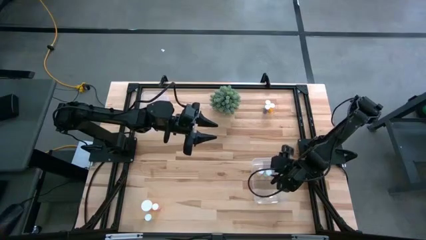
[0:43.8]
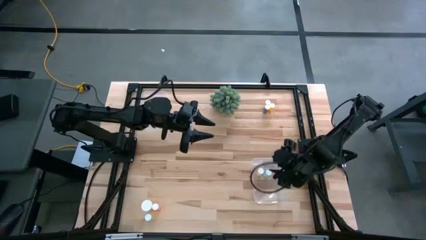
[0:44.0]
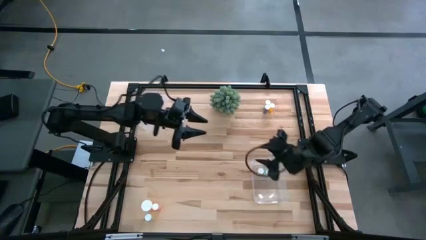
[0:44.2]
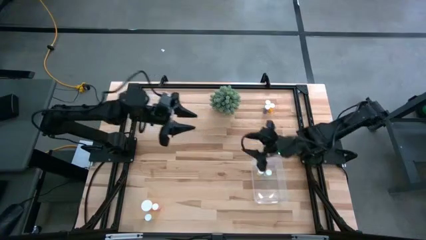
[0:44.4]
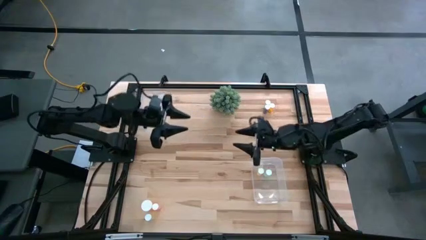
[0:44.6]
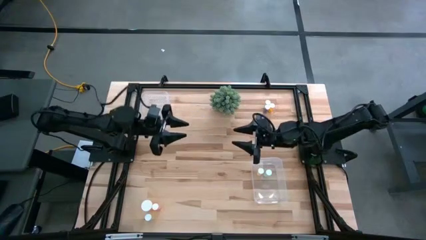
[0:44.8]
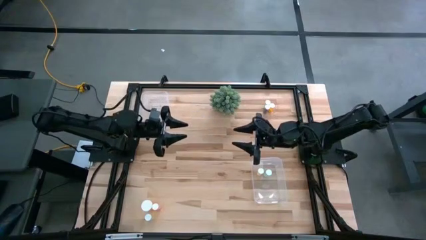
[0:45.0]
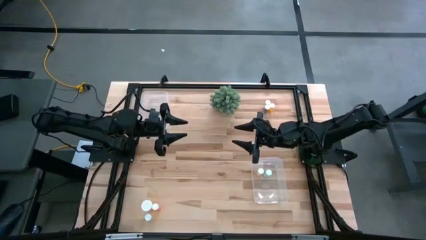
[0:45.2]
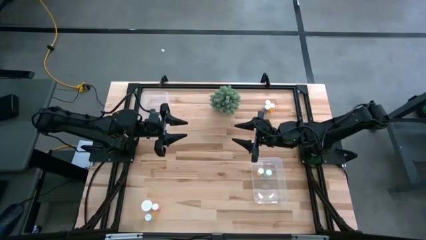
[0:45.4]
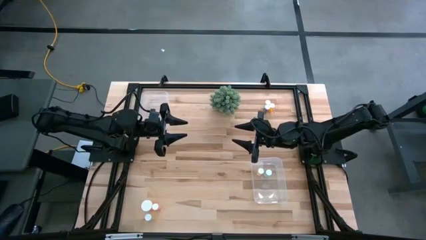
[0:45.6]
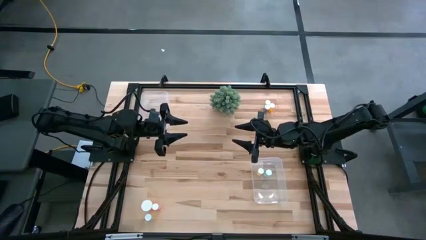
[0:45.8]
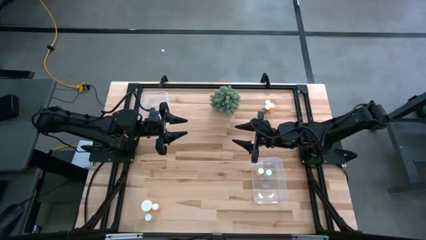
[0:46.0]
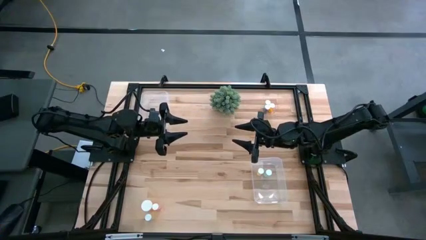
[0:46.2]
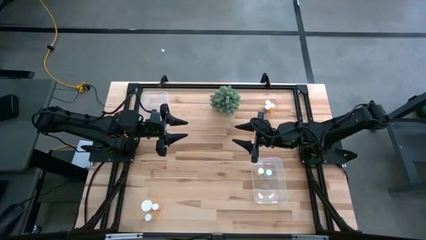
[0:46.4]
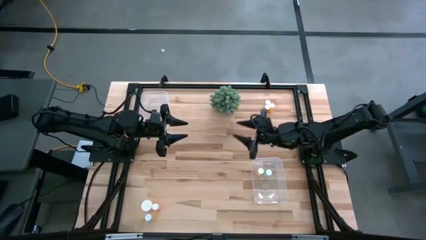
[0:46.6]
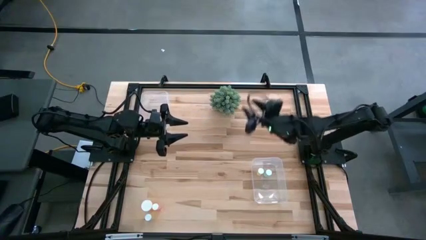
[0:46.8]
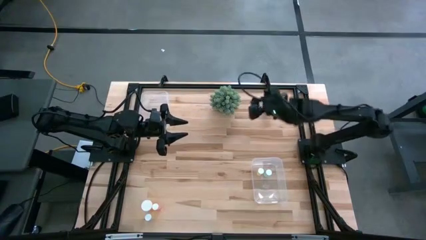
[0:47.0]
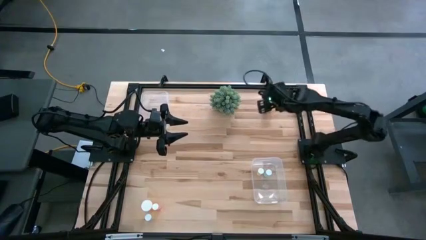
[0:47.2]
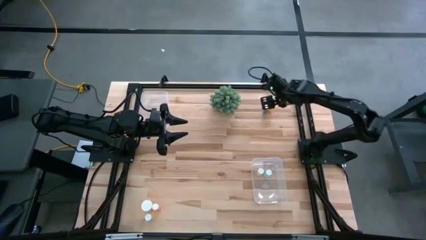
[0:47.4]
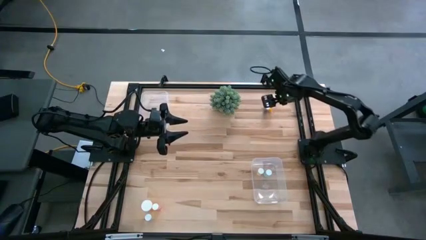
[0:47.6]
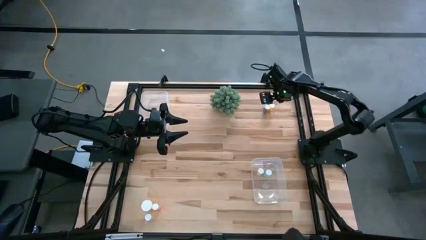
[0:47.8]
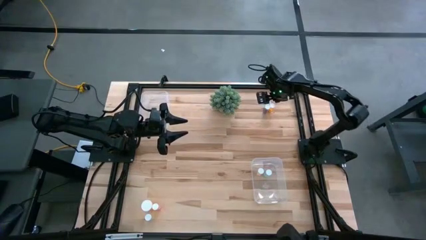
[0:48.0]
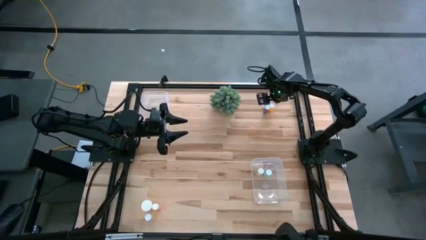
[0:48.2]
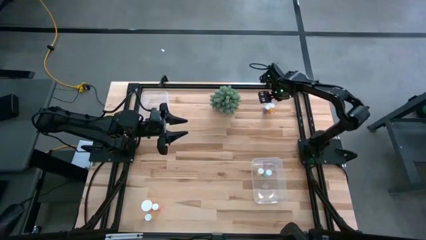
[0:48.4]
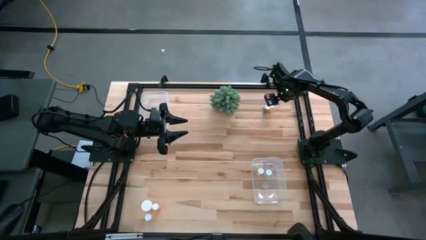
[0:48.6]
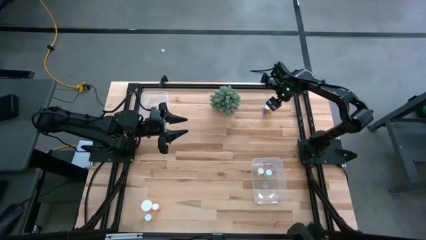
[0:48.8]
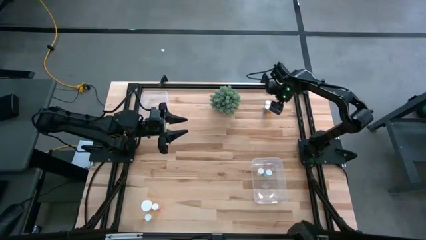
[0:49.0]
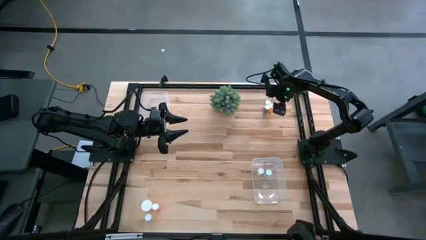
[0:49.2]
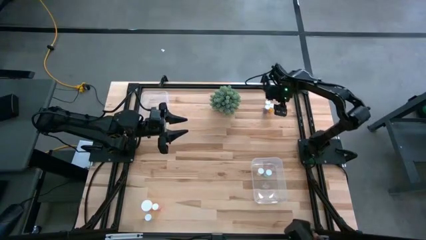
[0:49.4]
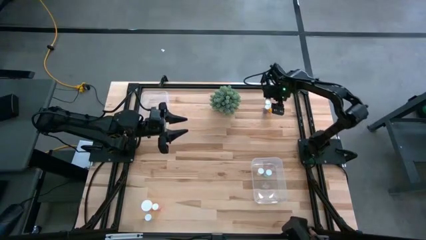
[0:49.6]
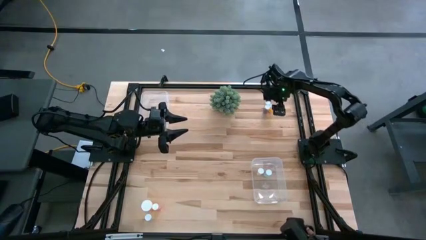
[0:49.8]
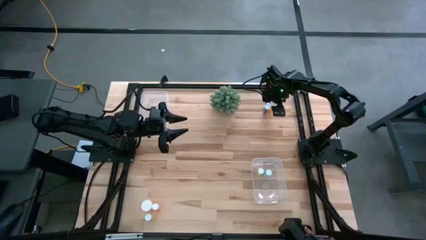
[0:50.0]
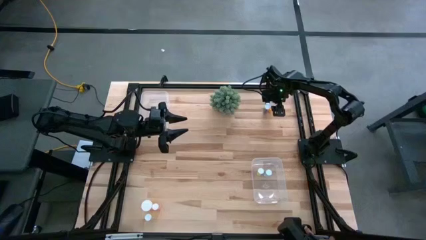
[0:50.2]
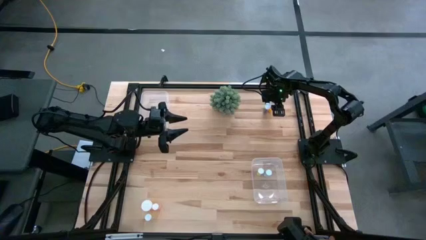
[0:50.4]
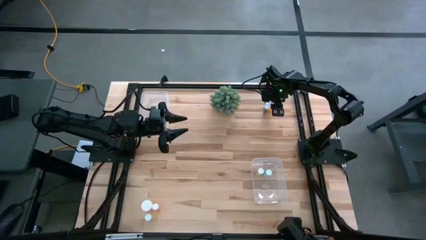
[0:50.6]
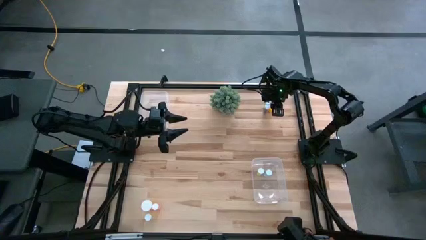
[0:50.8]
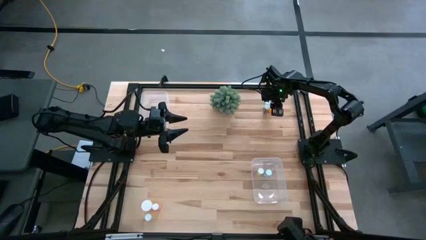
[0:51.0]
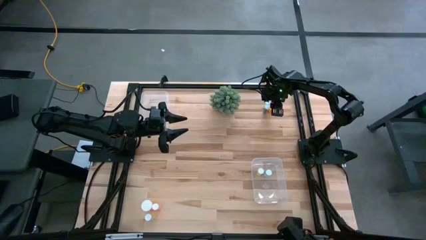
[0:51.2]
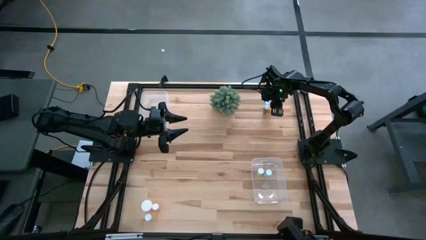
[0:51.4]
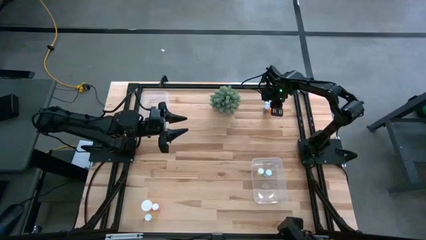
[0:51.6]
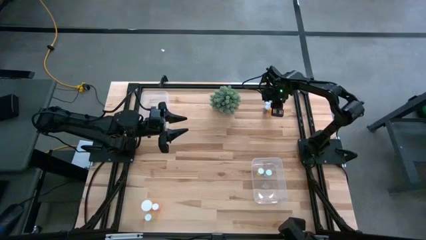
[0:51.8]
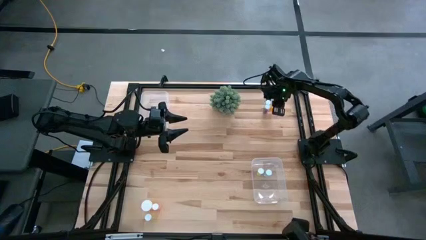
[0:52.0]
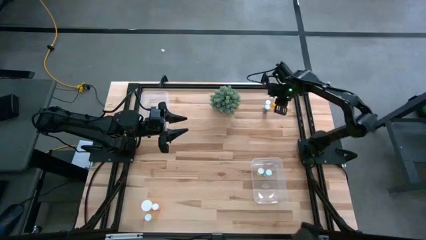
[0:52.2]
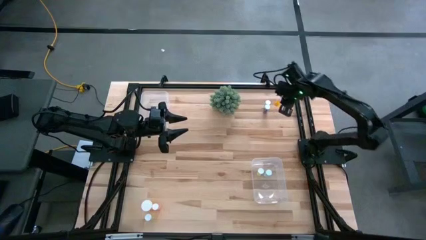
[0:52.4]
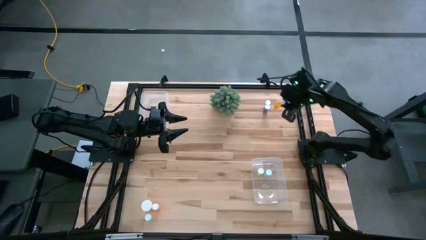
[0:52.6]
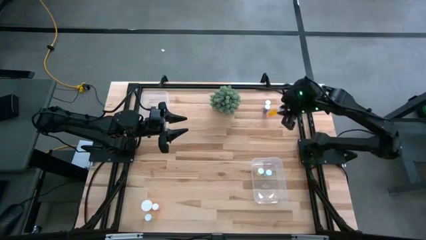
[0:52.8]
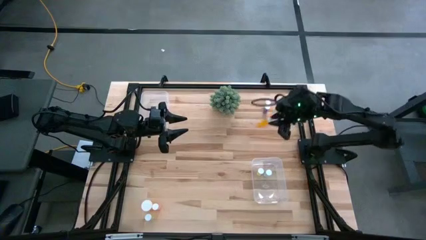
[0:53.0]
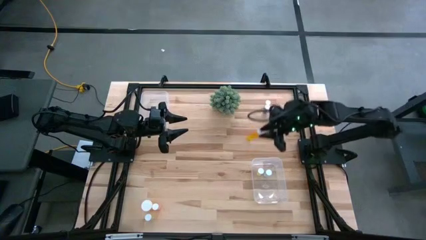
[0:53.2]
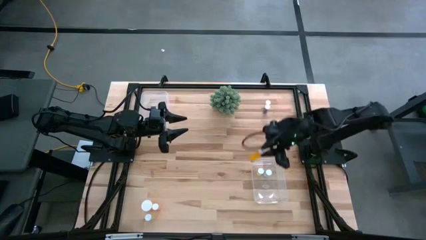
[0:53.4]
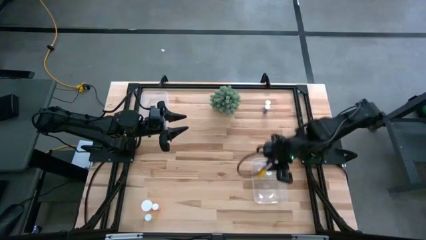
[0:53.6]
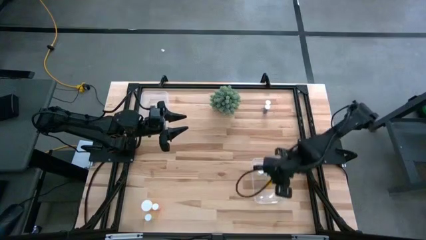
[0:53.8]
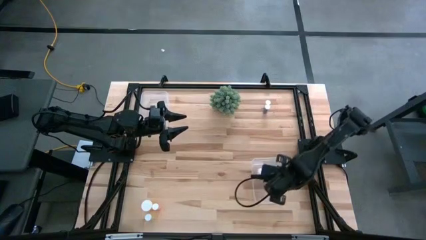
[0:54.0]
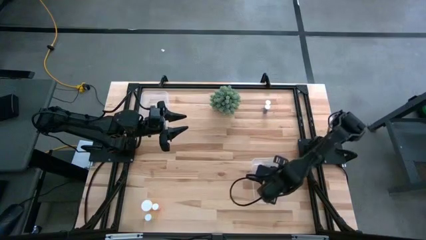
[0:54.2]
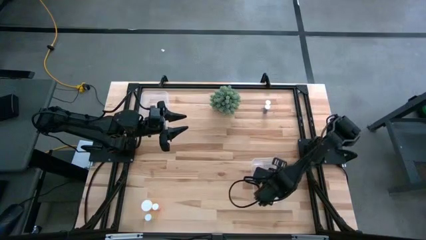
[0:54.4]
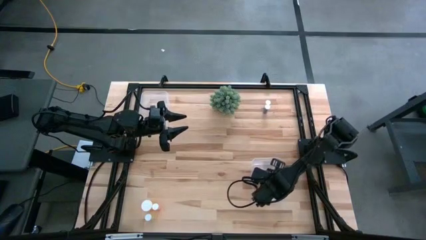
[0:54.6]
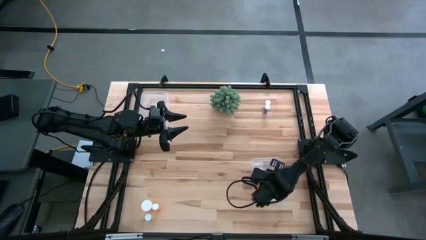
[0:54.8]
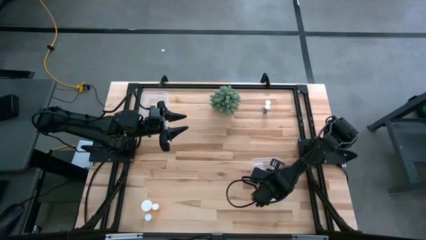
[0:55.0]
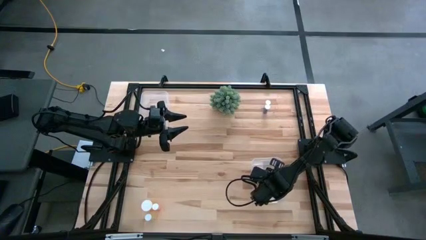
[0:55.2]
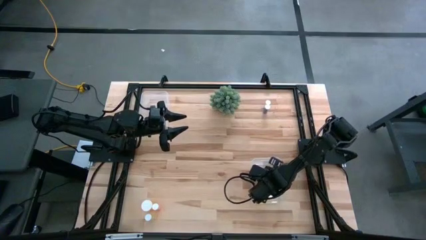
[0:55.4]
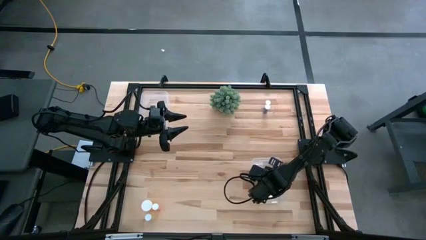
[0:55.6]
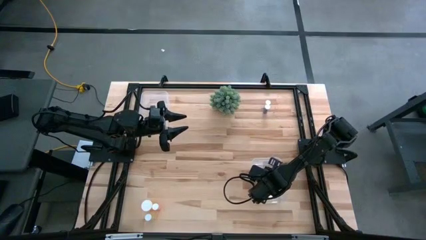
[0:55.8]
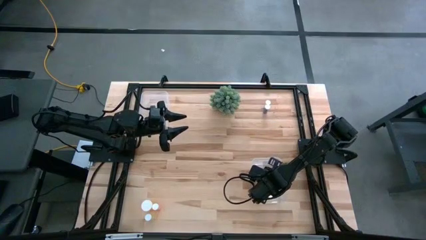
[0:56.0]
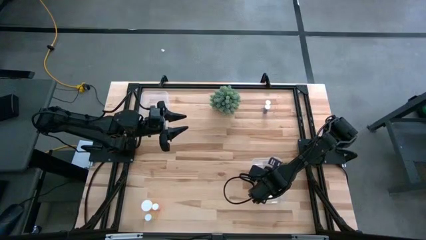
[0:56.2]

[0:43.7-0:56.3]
Task: Pick and place medicine bottles into bin by pill shape (circle, oval)
Put the orange tablet bottle into the right transparent bin

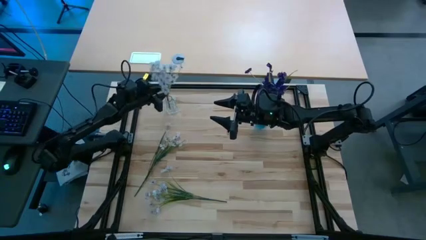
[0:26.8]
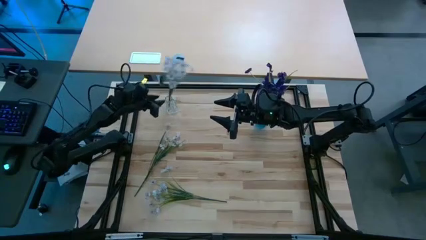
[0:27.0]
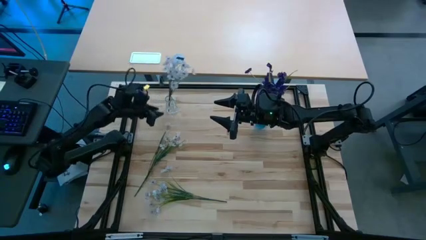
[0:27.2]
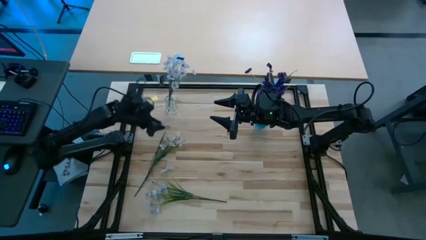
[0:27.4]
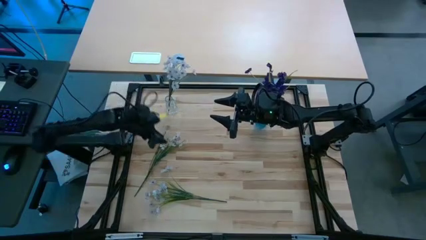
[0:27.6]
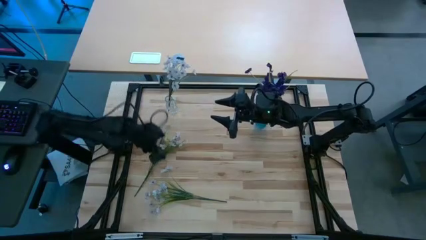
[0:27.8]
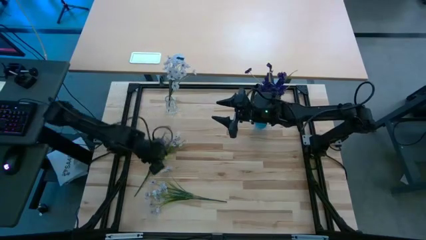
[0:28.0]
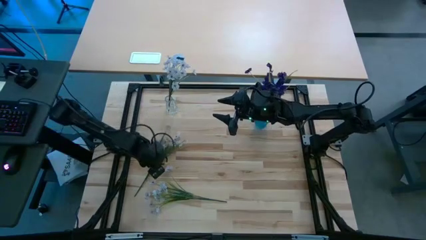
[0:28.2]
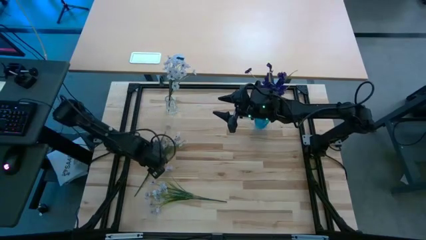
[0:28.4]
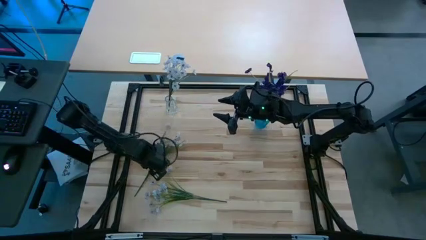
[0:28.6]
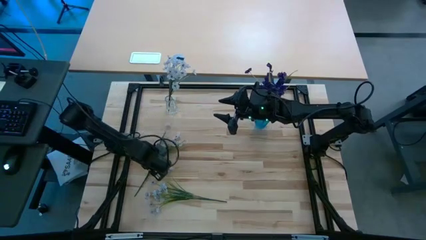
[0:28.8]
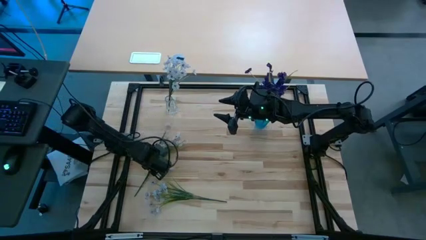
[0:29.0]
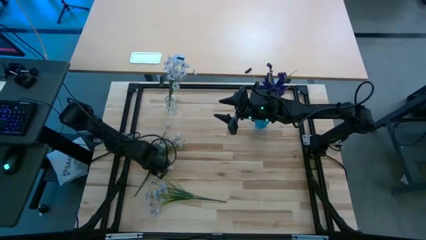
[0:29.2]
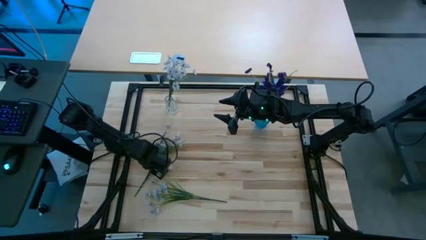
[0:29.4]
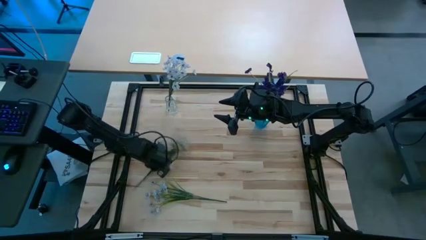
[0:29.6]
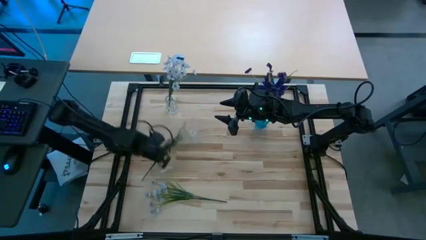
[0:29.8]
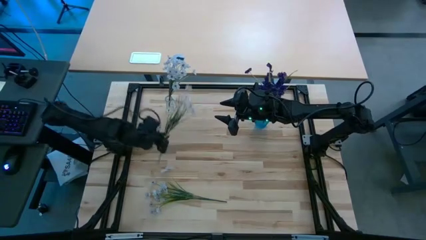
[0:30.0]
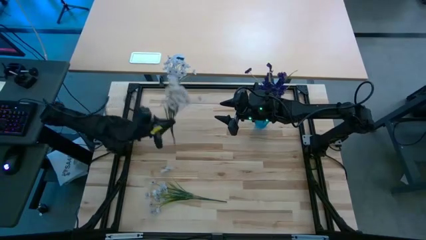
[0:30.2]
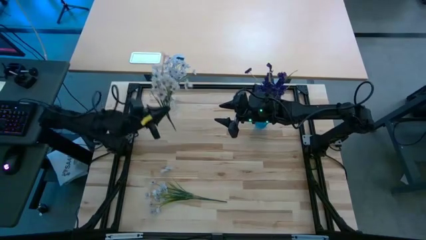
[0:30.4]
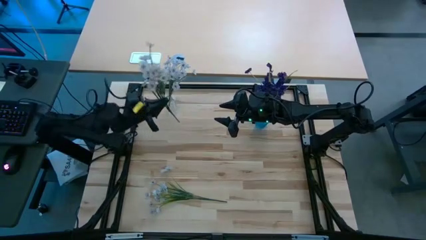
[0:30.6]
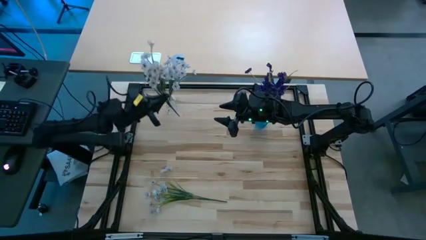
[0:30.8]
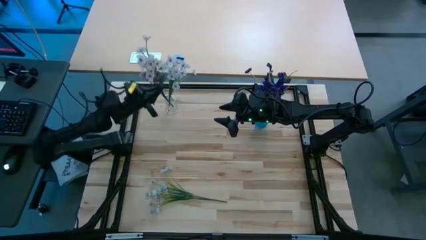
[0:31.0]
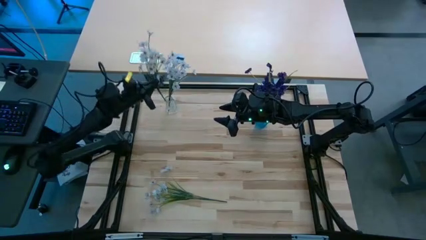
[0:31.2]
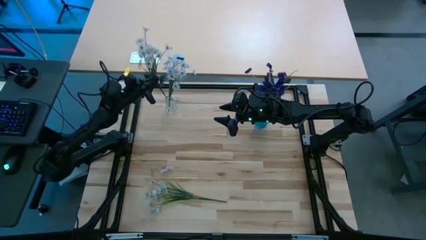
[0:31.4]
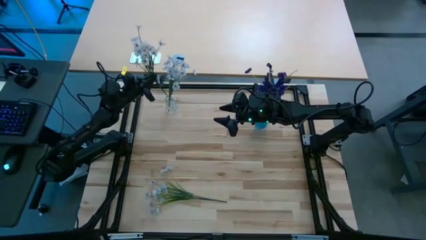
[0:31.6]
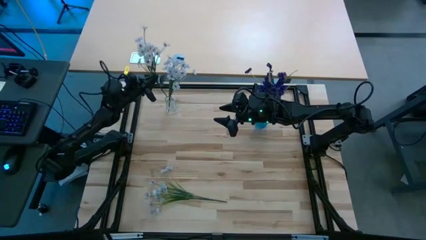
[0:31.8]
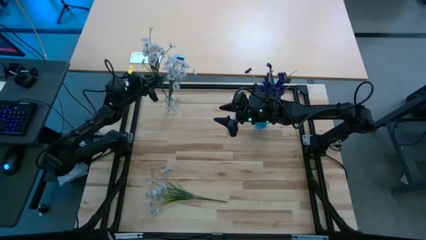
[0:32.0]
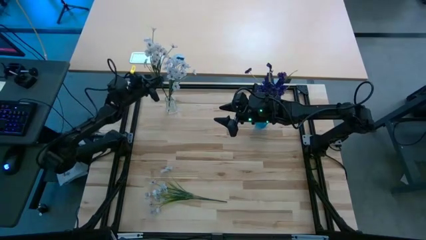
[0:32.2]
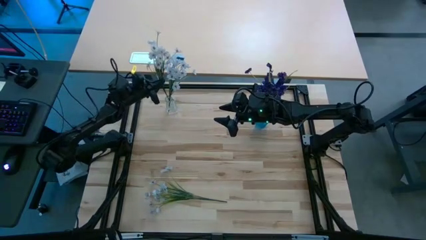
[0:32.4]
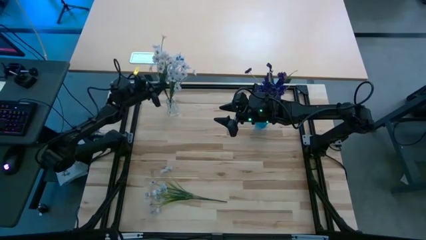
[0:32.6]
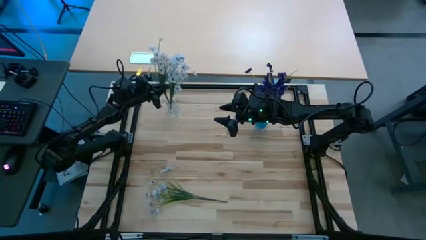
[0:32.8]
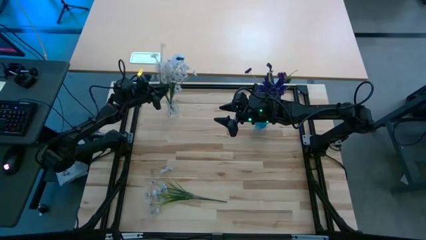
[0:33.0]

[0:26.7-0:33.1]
Task: Sort flowers into vase by color
Put the top white flowers into the transparent vase
